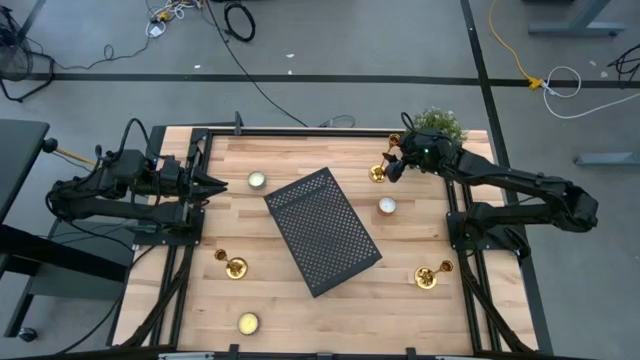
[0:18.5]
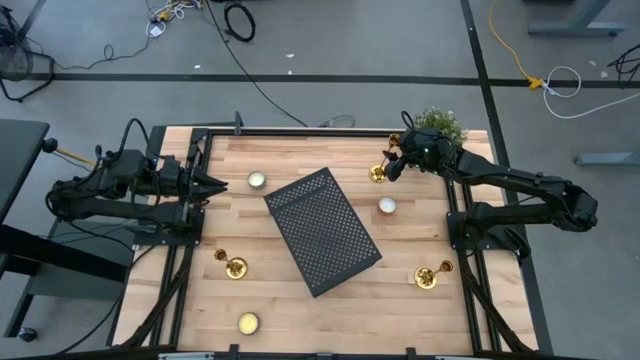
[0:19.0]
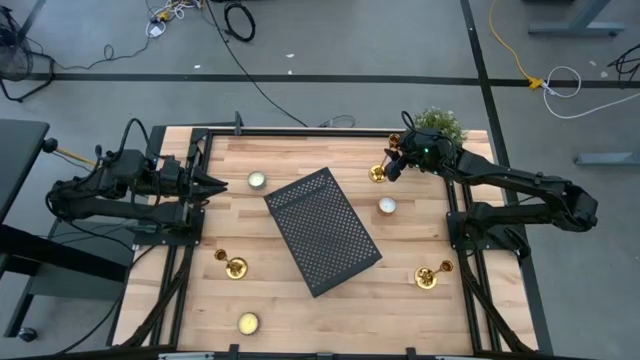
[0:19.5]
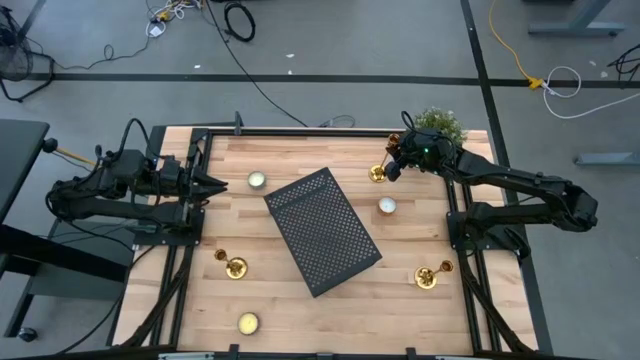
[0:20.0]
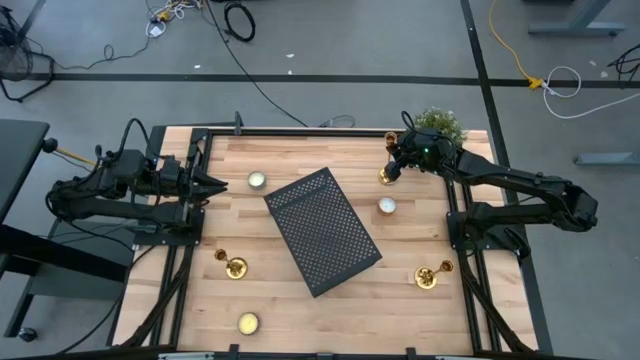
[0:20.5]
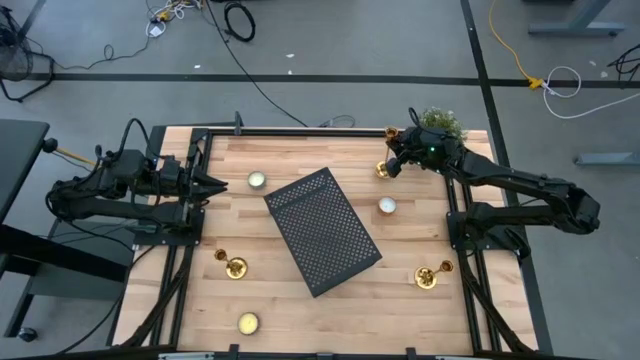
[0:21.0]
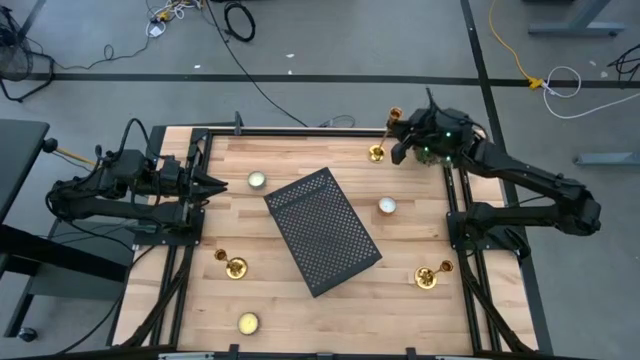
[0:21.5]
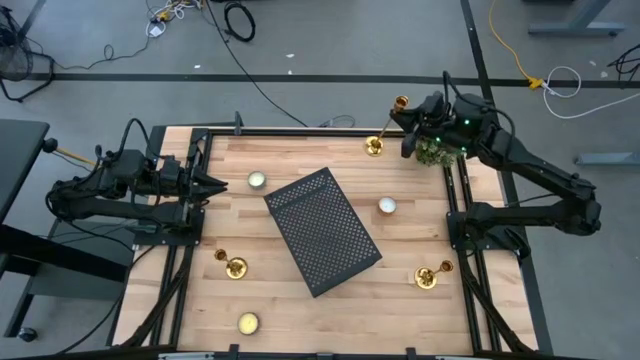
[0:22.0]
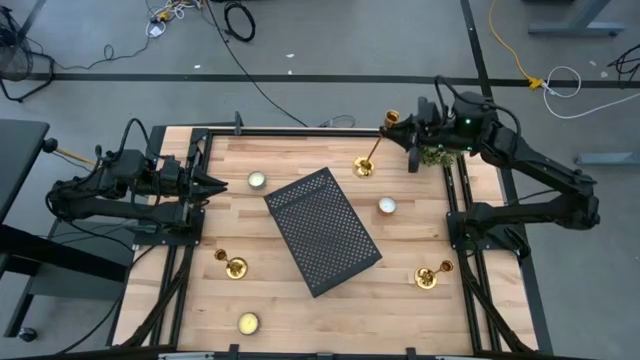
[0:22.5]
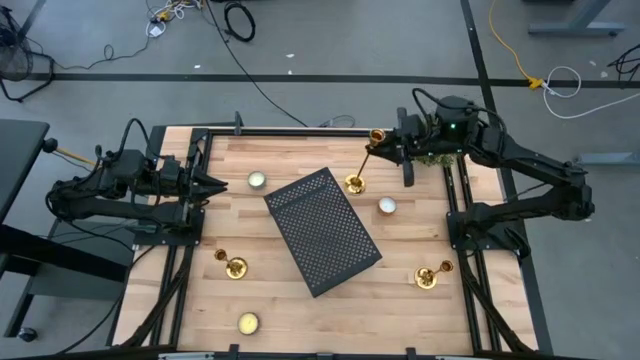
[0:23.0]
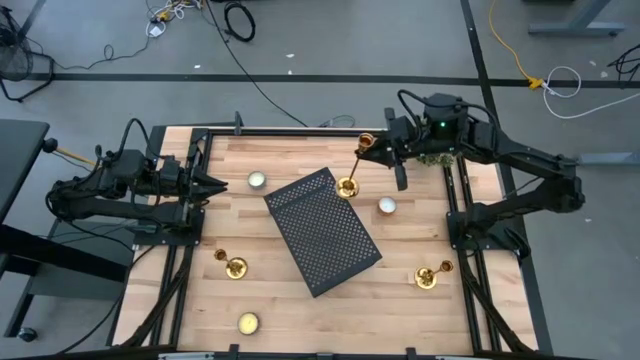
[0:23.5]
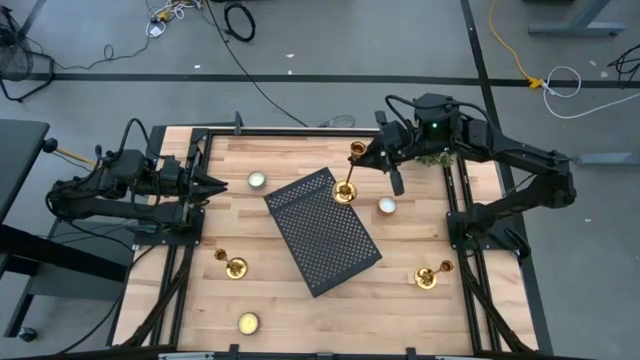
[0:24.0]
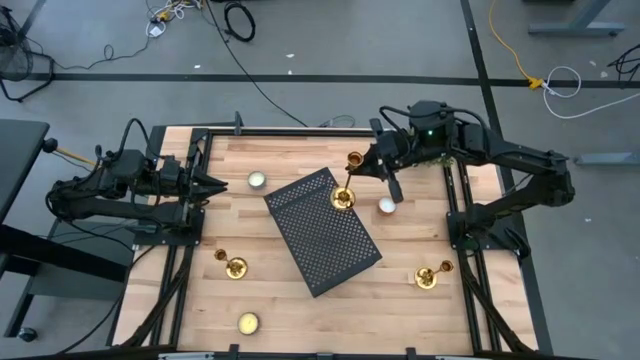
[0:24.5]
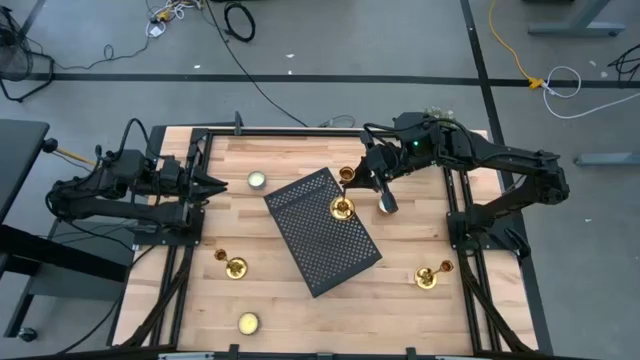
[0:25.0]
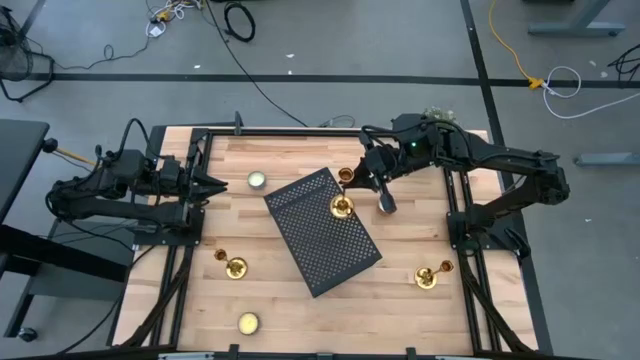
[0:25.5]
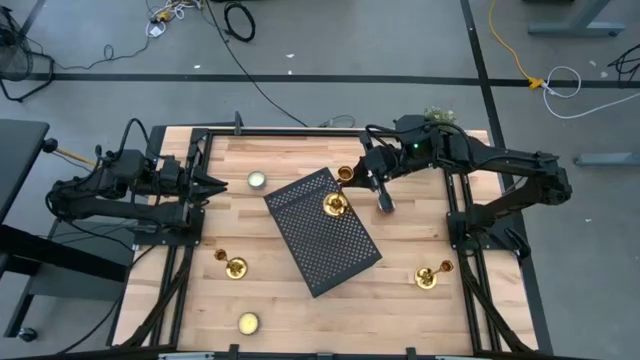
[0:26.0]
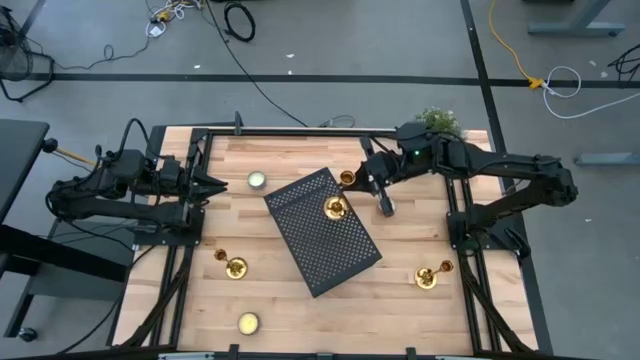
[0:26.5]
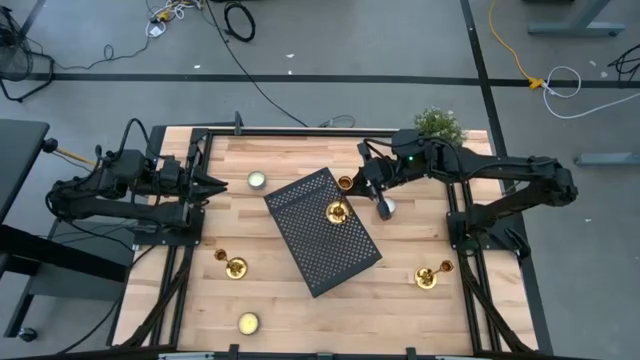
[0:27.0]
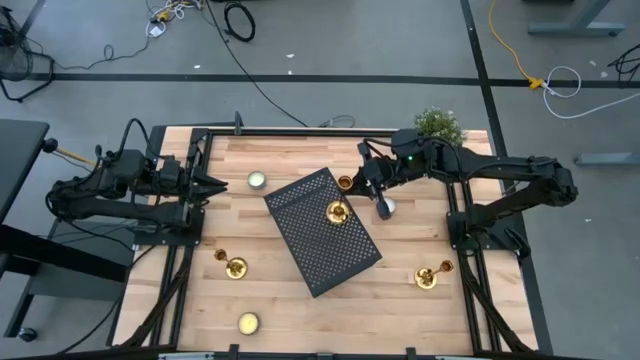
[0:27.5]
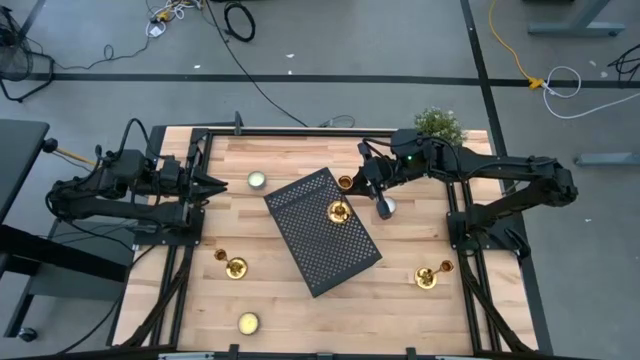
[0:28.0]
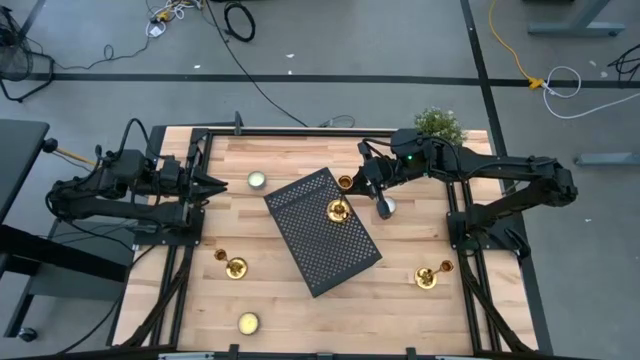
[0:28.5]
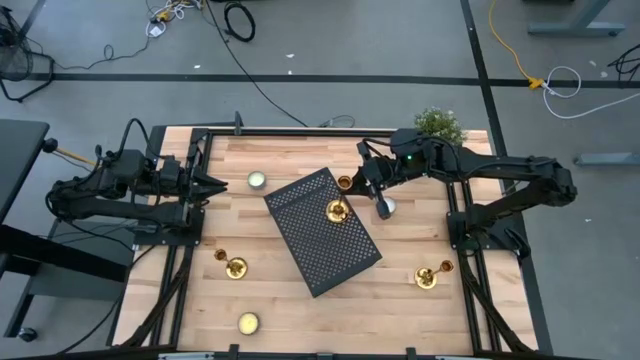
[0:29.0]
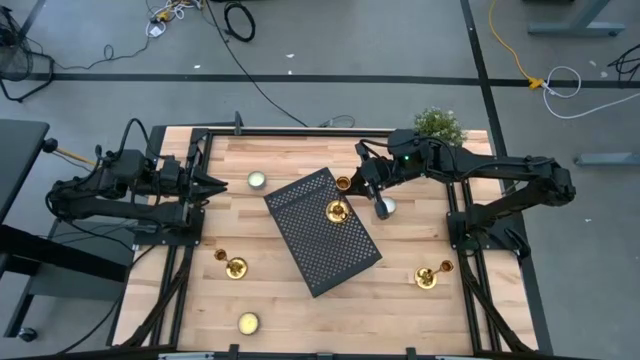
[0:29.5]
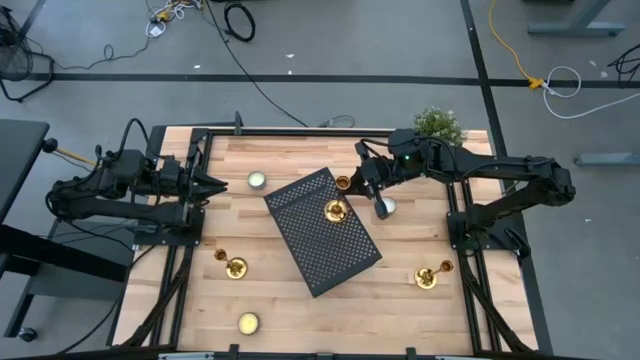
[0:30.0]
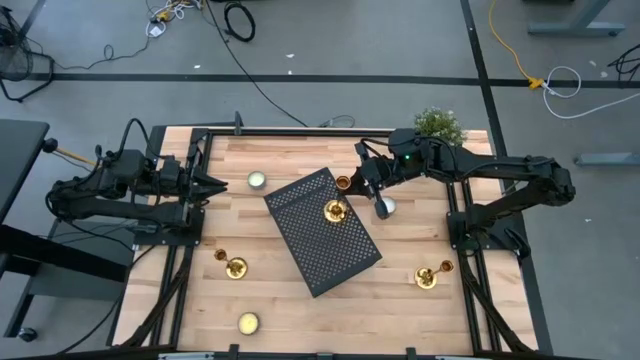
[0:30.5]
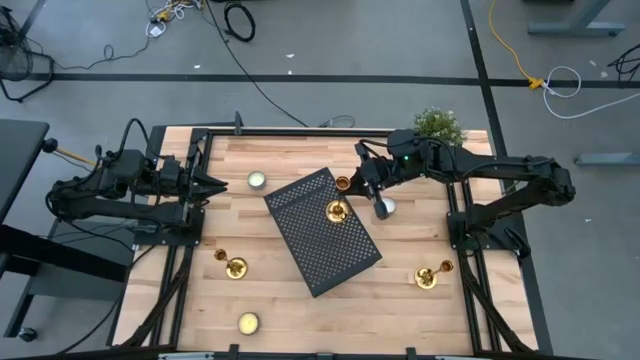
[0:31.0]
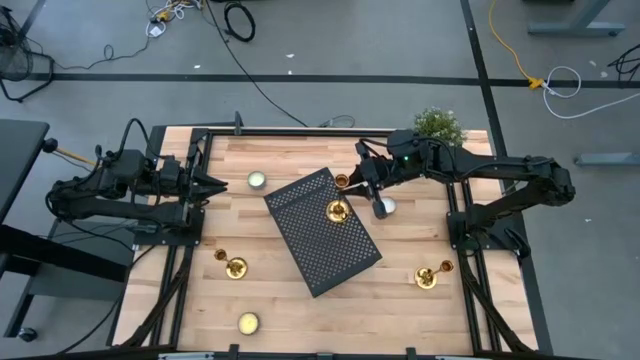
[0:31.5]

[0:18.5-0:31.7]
Task: Pick & Place candle stick holders
Put the top gold candle holder on the shelf

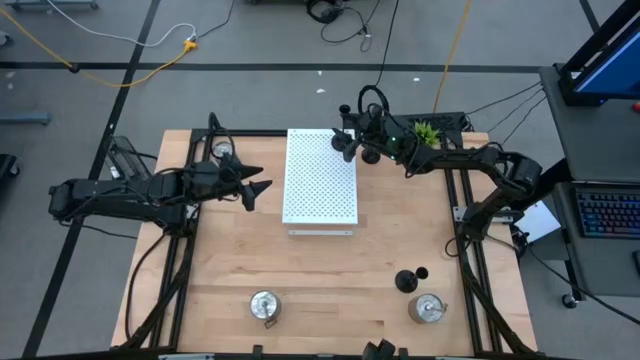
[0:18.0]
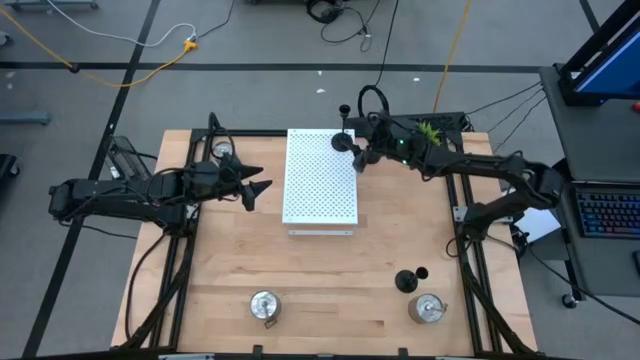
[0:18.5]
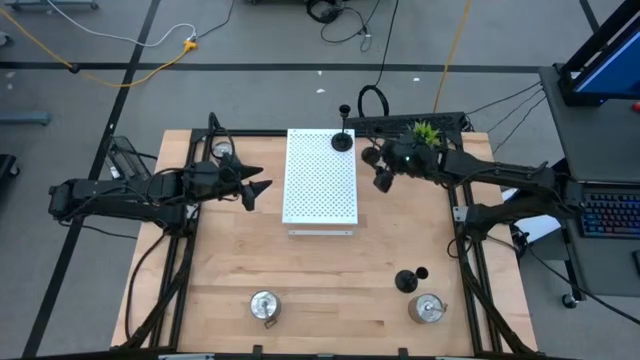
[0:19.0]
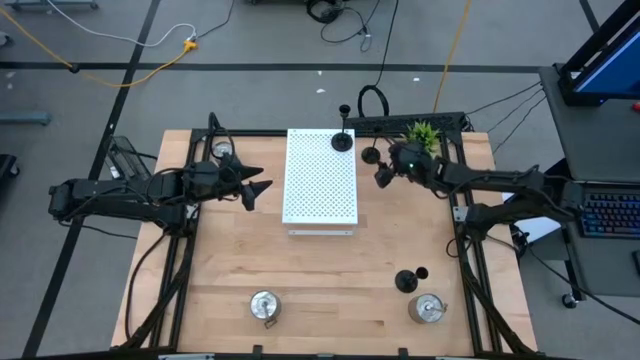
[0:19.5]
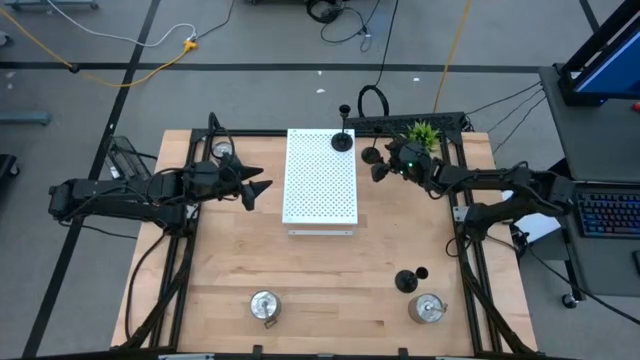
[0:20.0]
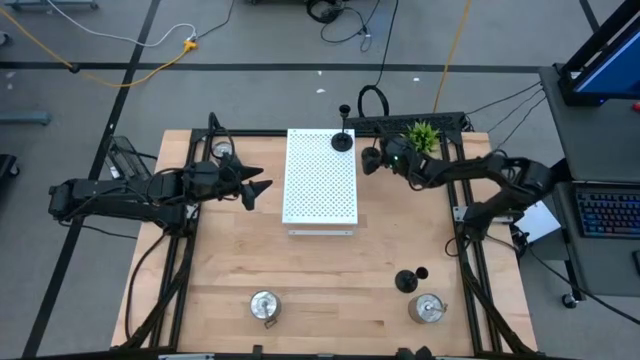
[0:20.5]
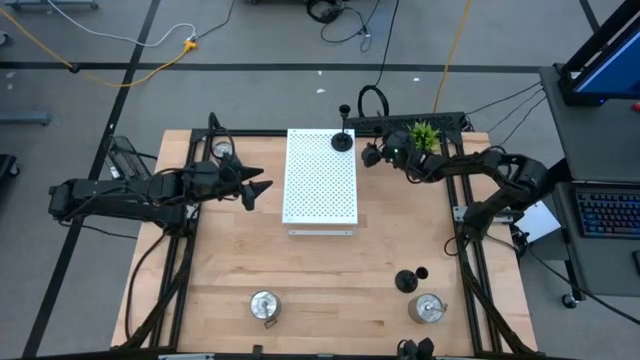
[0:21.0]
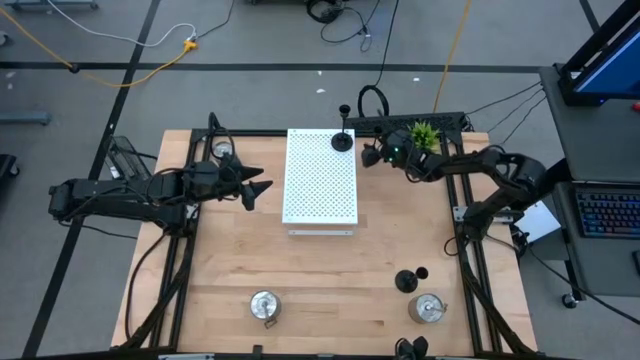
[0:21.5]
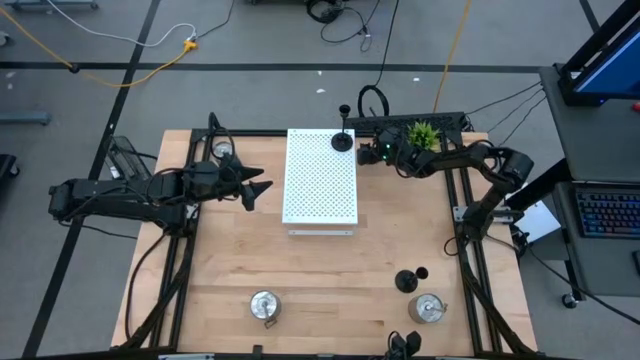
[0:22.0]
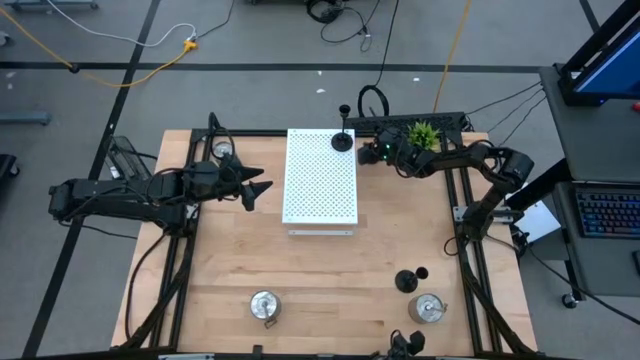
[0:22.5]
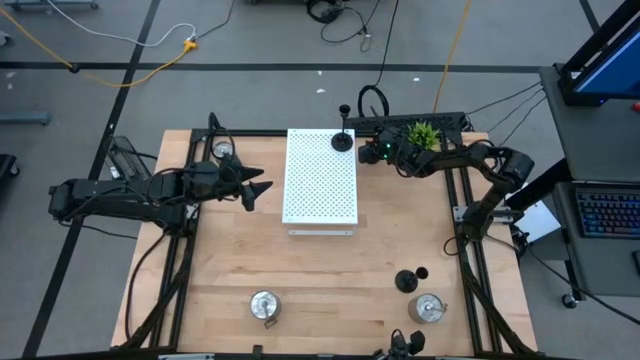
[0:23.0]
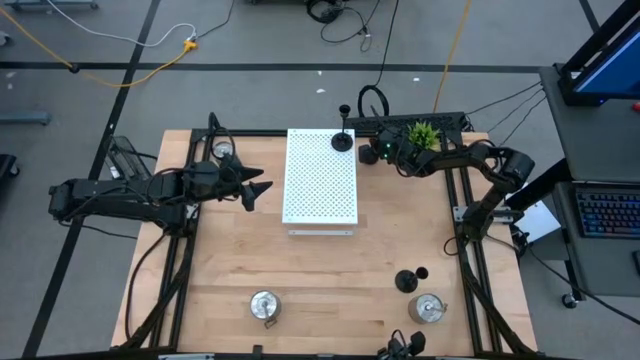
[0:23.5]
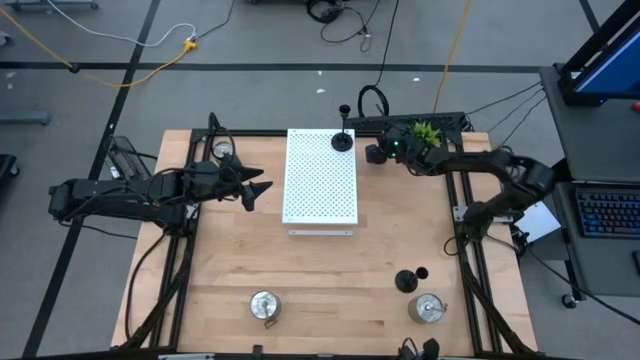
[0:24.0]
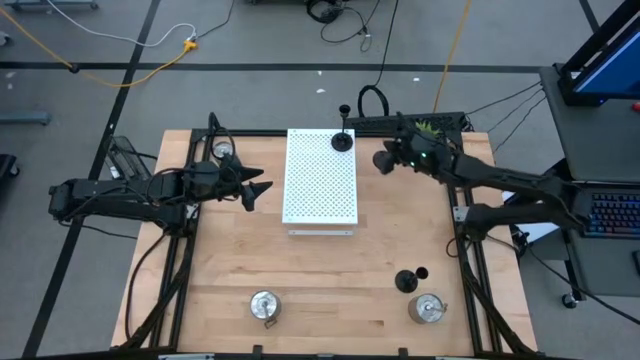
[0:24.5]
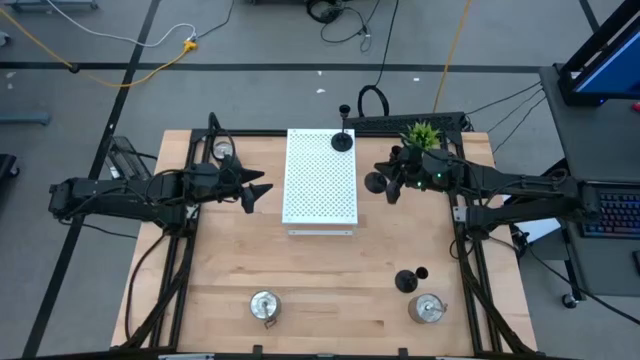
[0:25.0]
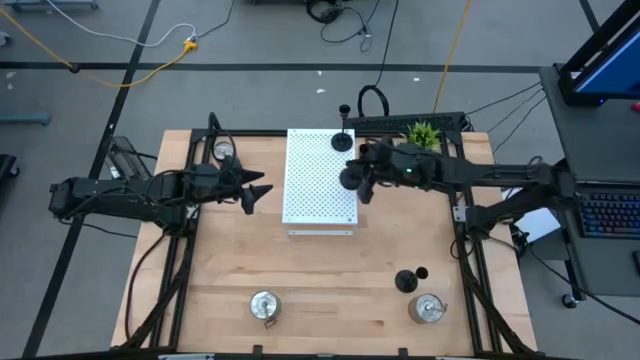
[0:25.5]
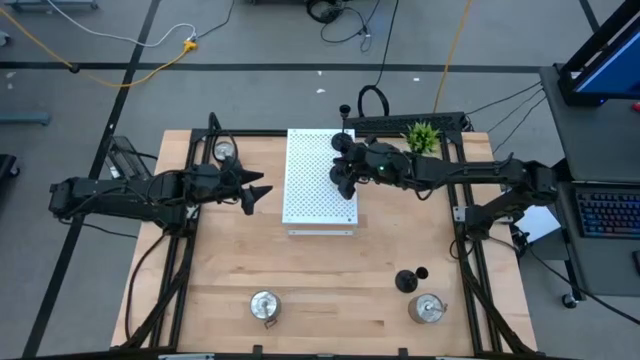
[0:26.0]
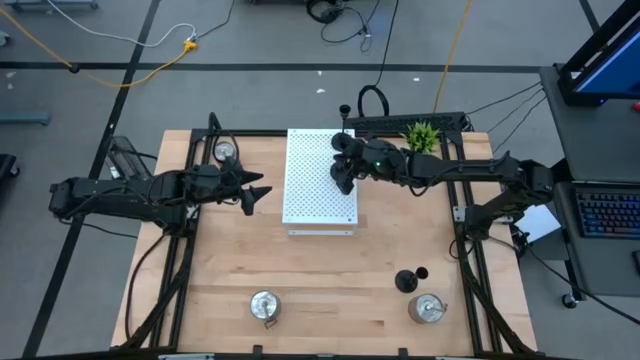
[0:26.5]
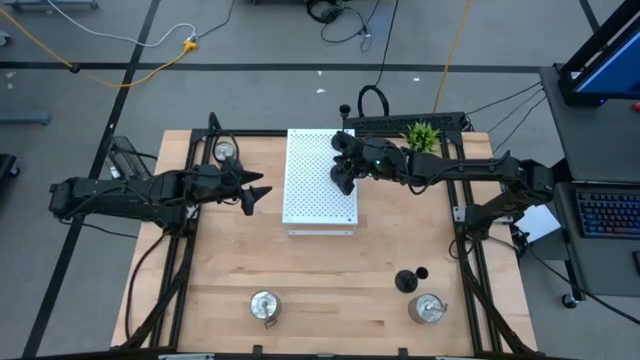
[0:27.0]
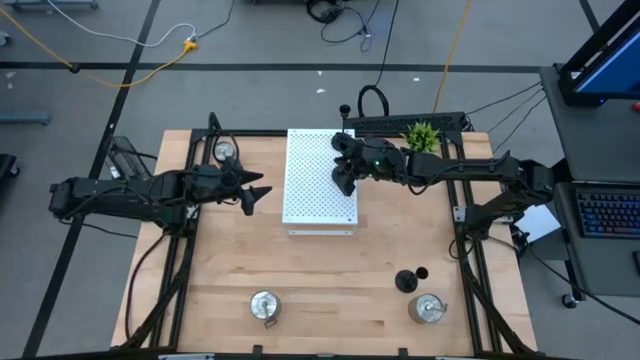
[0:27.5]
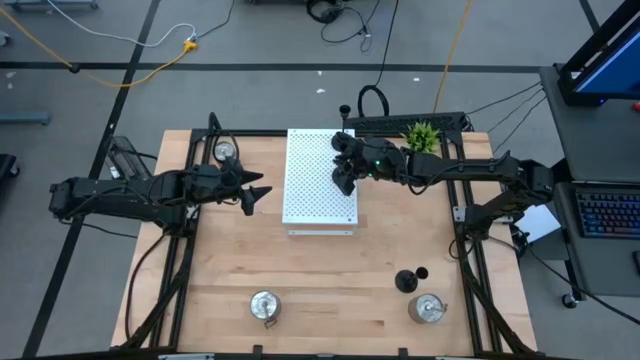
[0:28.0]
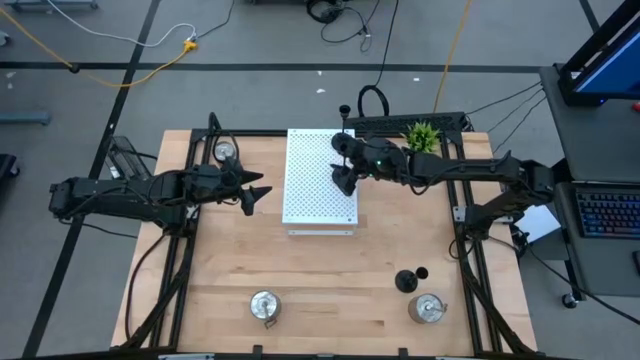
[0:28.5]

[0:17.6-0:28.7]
Task: Pick & Place candle stick holders
Put the top black candle holder on the shelf aligned with the other black candle holder
